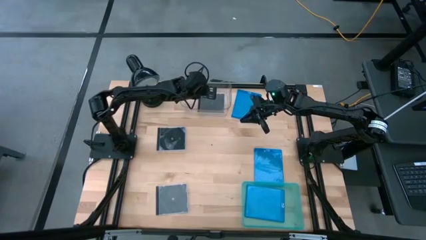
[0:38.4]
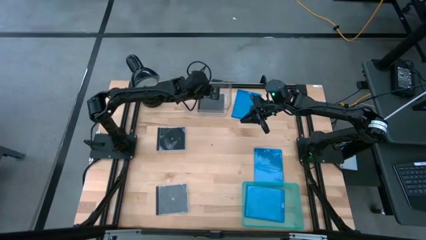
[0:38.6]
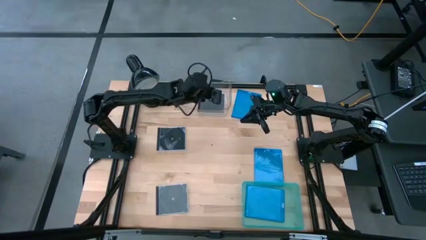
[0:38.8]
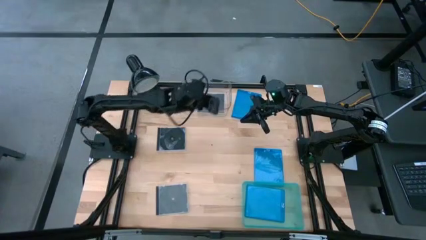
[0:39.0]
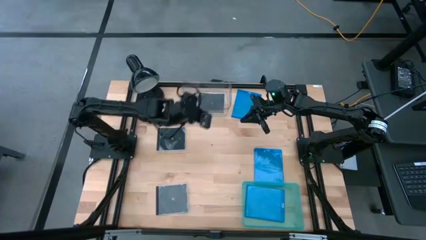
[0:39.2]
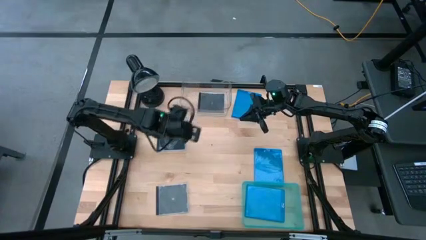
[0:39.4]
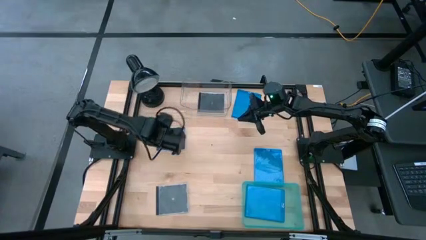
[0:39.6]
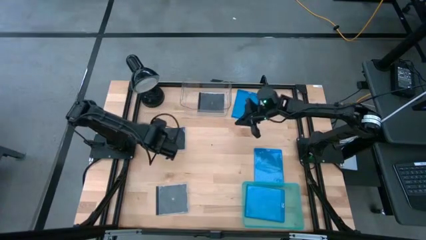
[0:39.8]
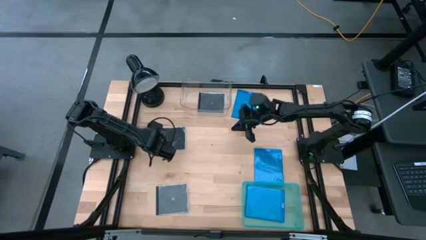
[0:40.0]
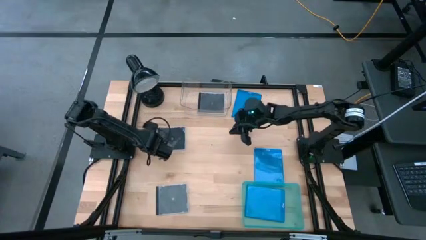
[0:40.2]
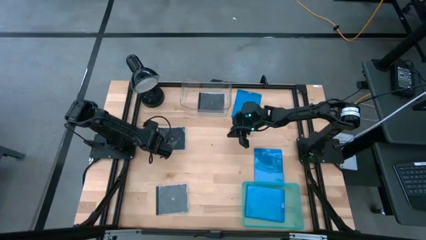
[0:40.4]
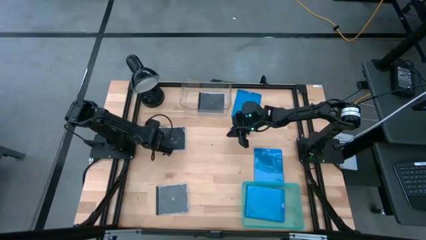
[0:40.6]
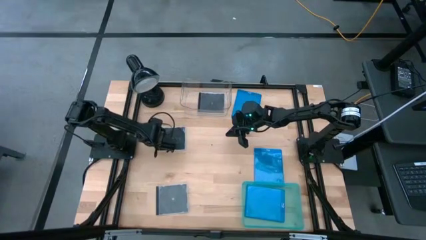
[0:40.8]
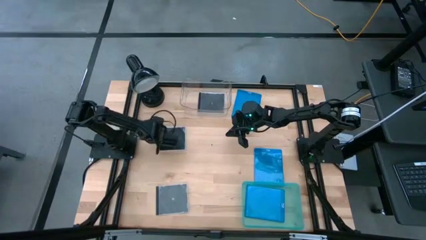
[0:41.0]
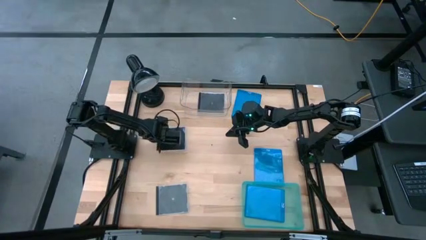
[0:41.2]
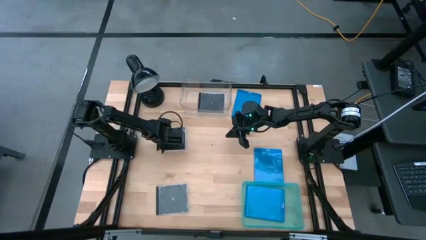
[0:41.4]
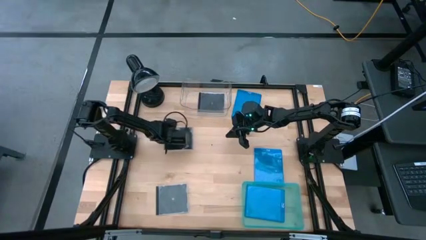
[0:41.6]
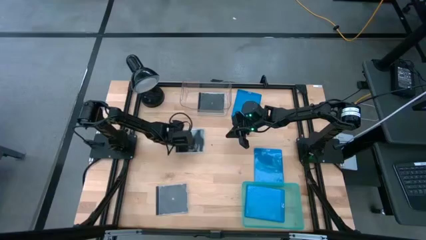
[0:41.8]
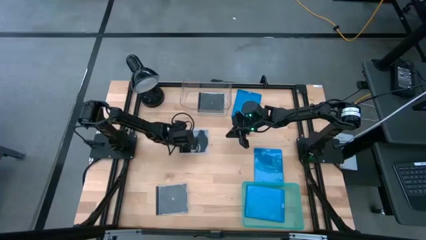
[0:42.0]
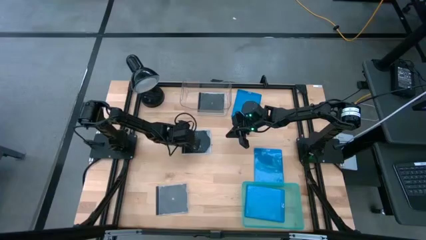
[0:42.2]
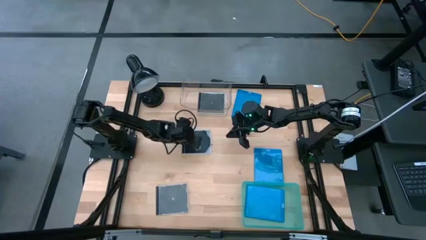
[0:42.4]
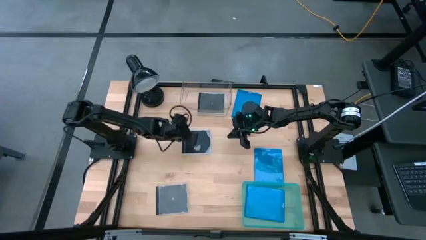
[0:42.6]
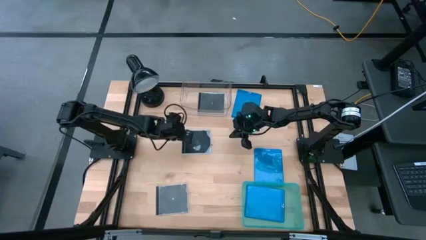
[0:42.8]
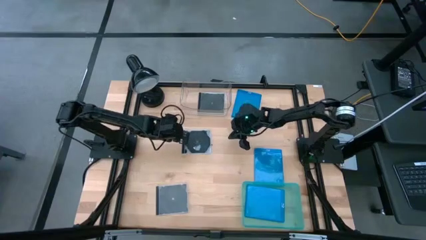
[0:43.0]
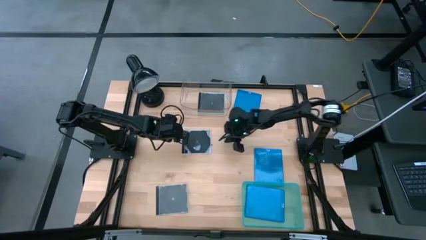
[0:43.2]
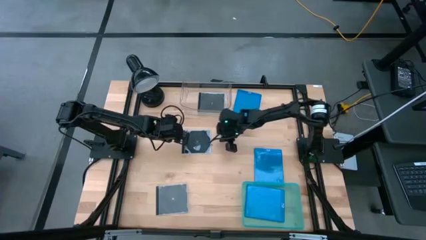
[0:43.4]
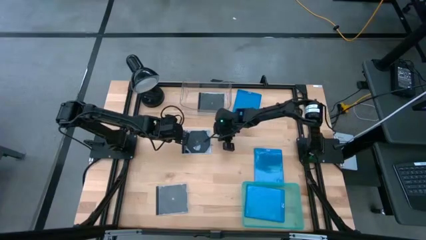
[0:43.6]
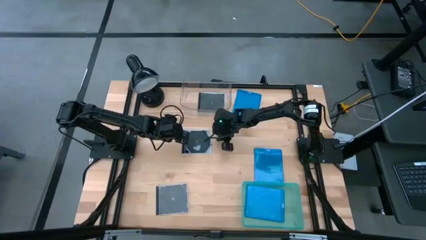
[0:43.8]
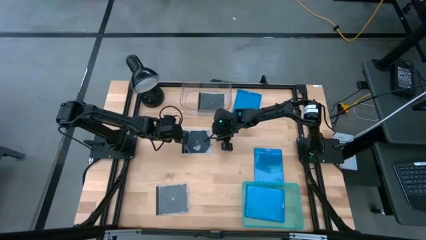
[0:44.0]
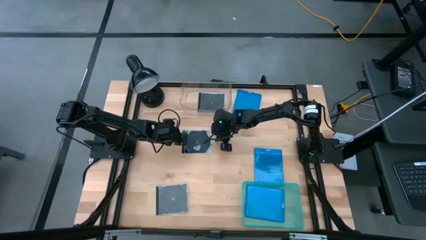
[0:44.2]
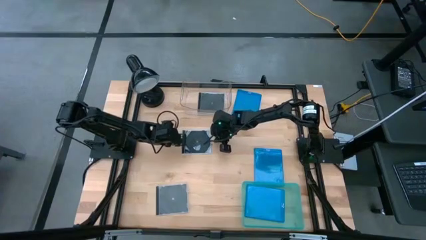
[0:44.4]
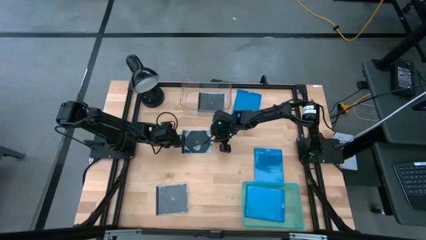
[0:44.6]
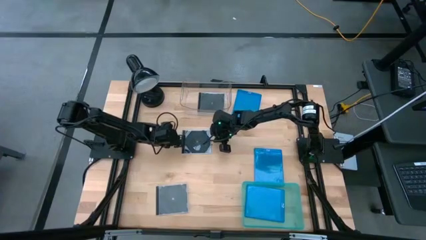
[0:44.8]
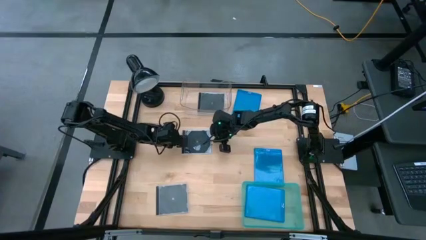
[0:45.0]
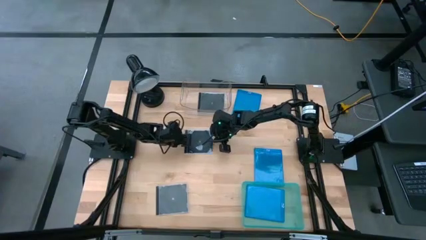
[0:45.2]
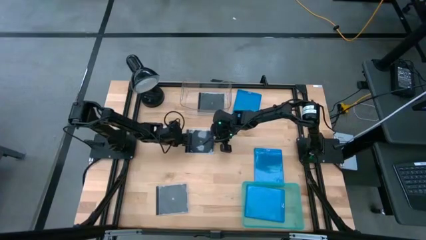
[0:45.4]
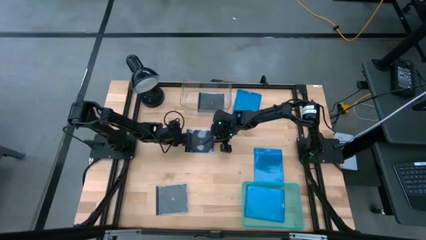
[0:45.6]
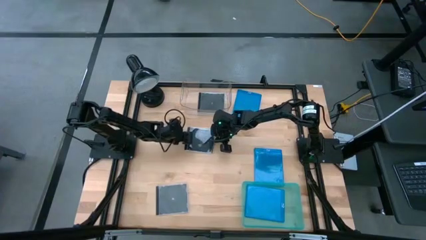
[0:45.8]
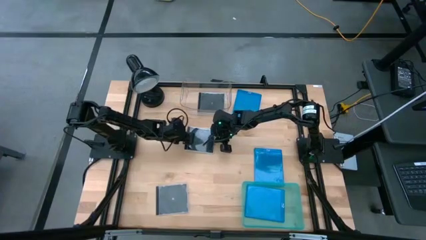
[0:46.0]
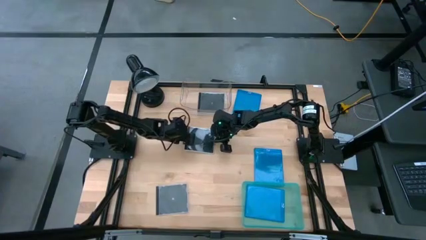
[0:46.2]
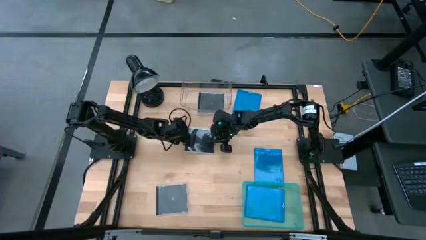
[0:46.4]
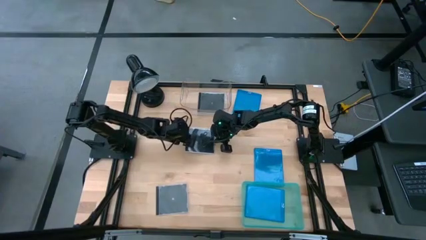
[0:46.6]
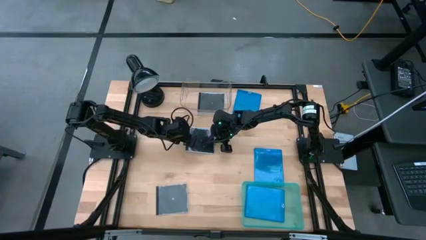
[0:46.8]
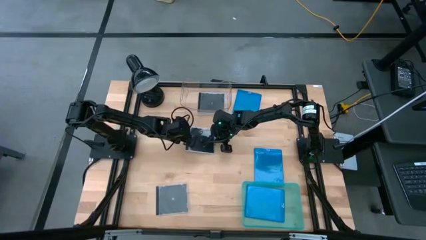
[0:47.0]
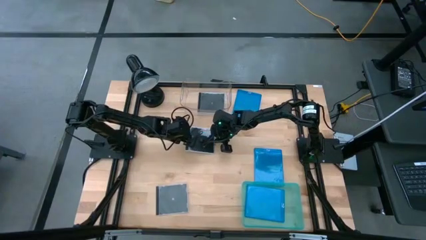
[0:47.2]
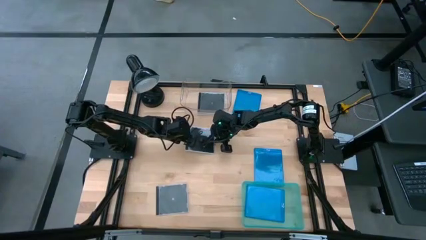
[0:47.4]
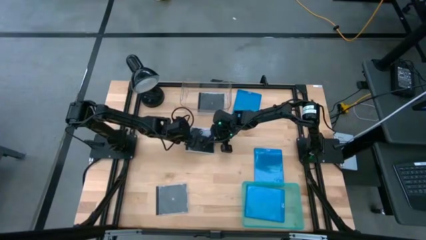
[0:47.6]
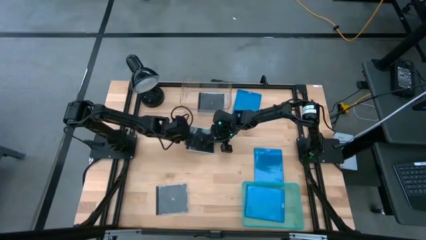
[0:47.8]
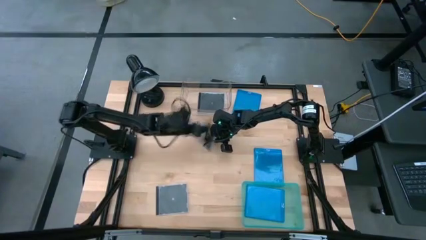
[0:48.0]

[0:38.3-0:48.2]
Task: Pick & place jewel cases by type
Put the top black cd case into the transparent bin

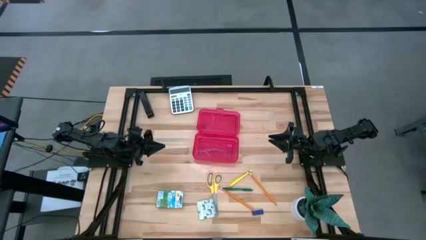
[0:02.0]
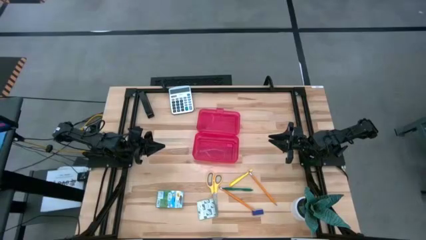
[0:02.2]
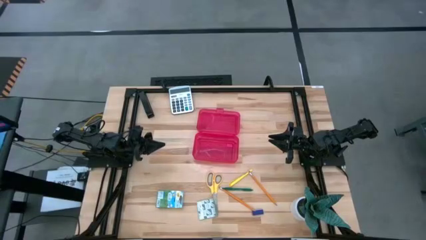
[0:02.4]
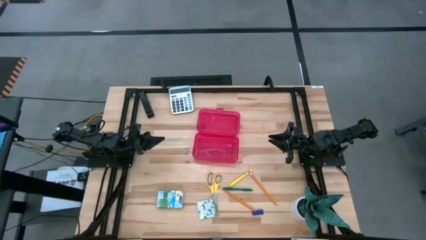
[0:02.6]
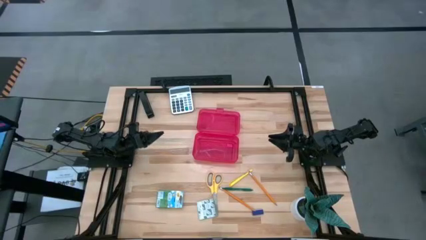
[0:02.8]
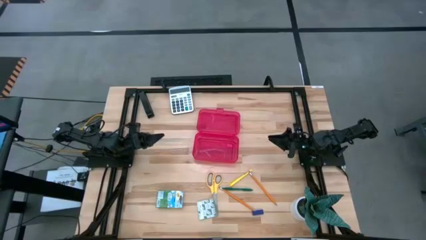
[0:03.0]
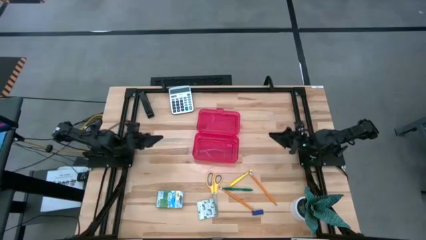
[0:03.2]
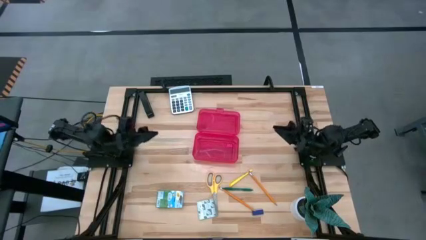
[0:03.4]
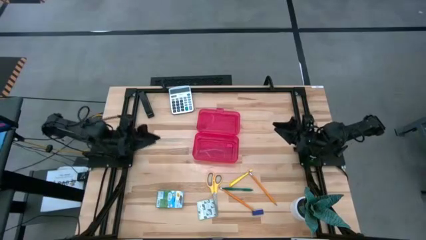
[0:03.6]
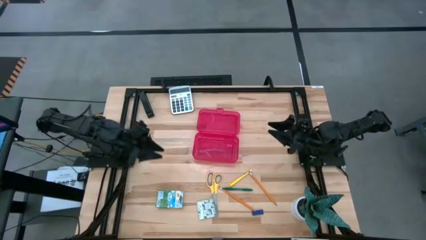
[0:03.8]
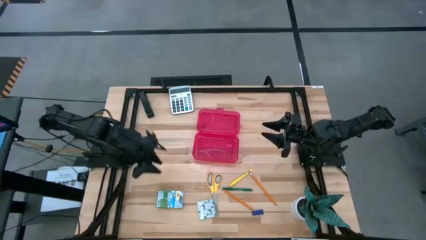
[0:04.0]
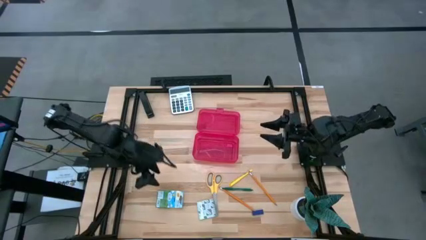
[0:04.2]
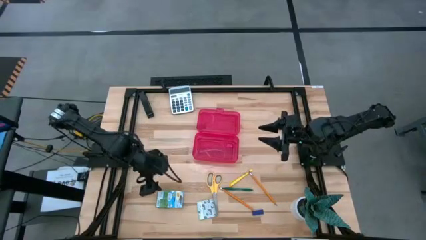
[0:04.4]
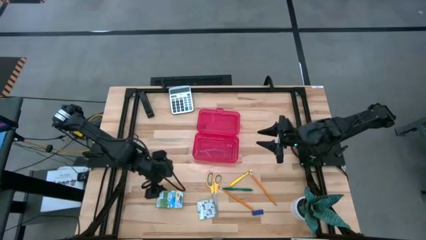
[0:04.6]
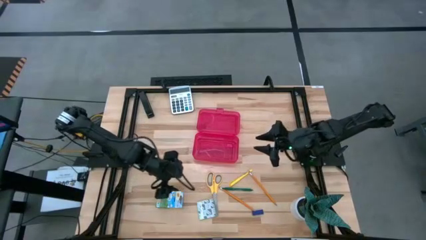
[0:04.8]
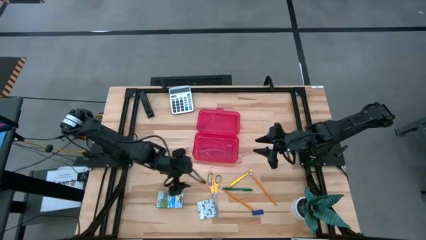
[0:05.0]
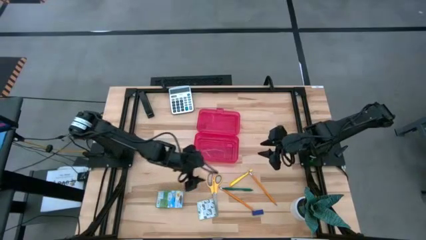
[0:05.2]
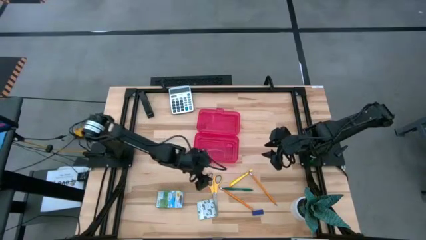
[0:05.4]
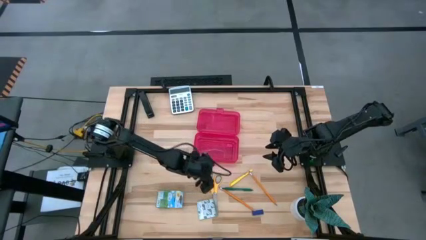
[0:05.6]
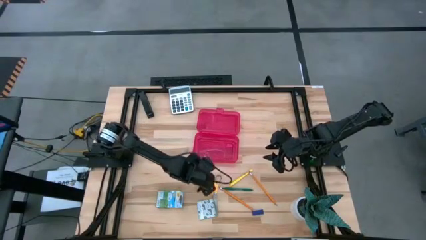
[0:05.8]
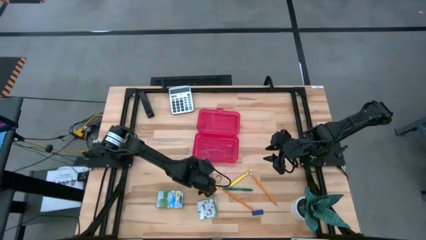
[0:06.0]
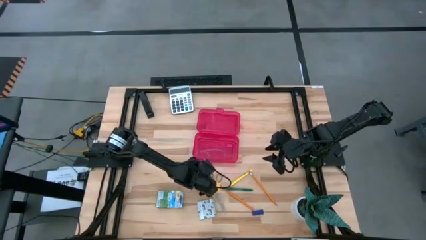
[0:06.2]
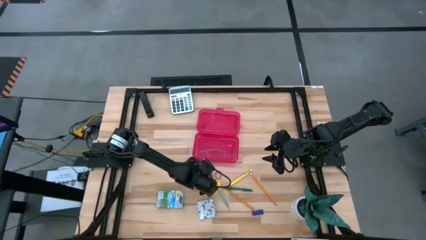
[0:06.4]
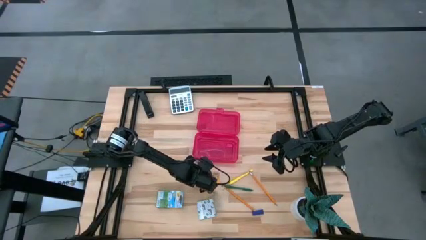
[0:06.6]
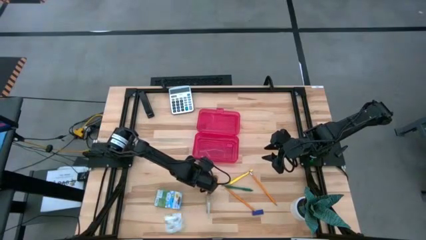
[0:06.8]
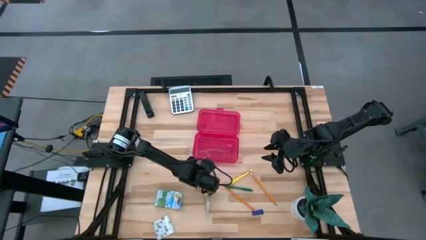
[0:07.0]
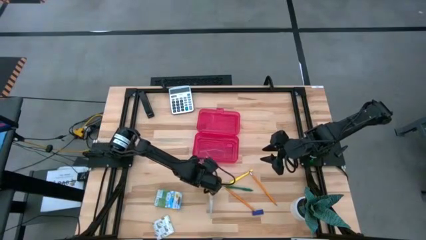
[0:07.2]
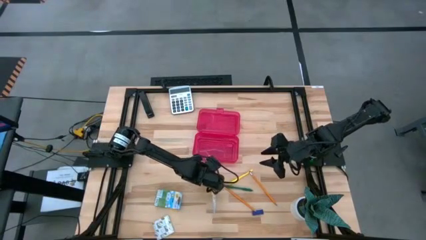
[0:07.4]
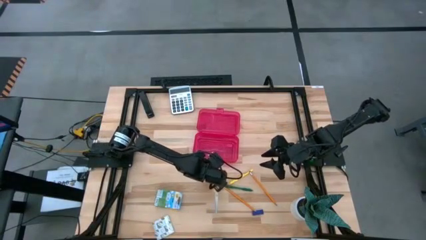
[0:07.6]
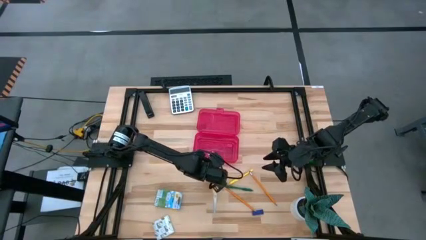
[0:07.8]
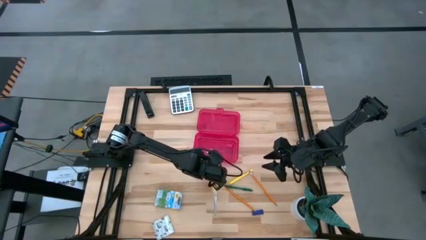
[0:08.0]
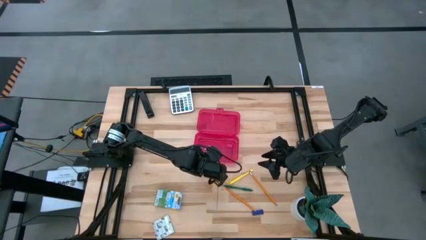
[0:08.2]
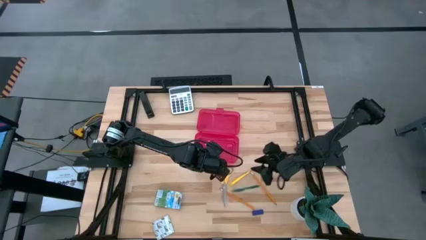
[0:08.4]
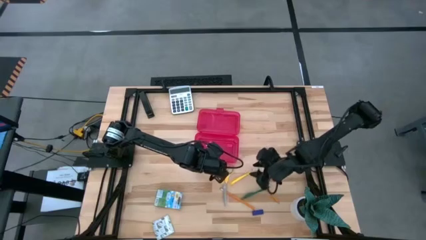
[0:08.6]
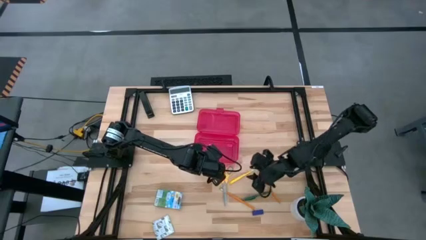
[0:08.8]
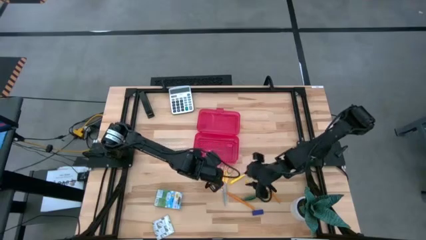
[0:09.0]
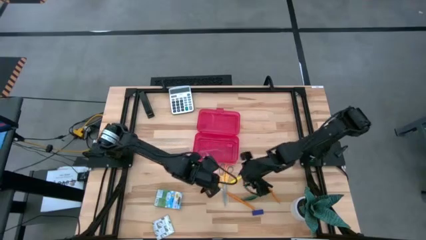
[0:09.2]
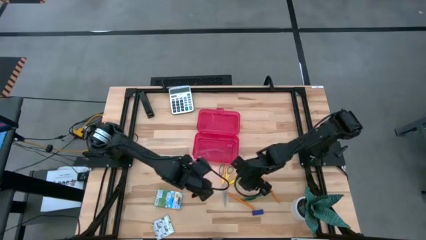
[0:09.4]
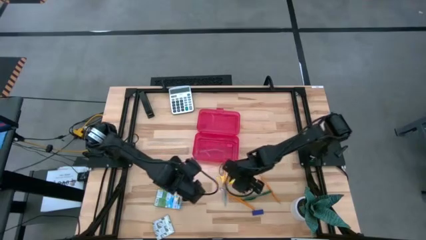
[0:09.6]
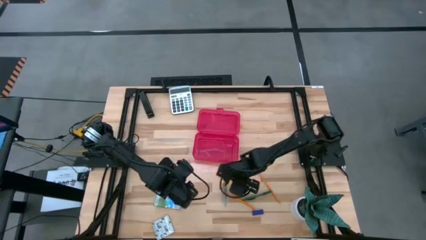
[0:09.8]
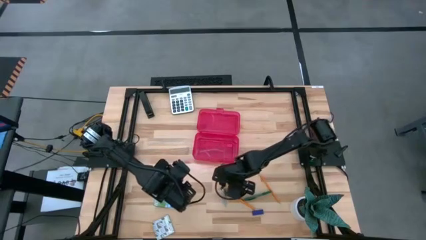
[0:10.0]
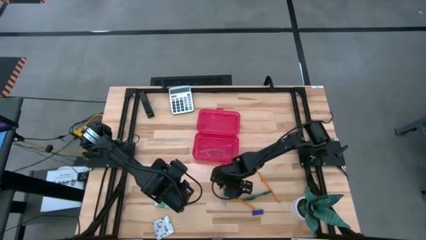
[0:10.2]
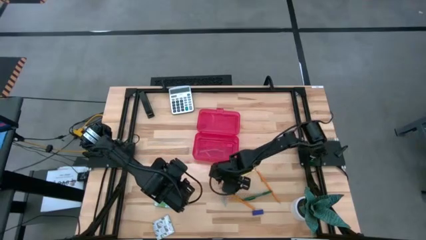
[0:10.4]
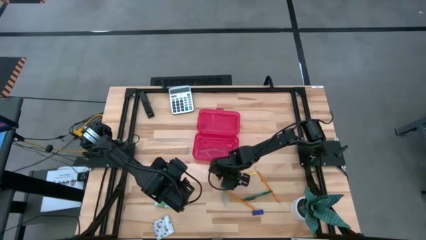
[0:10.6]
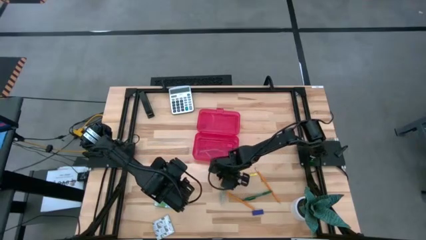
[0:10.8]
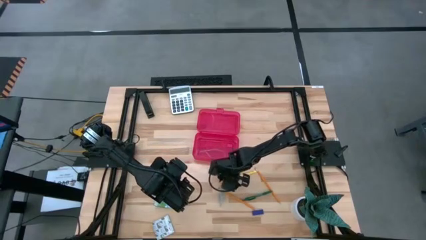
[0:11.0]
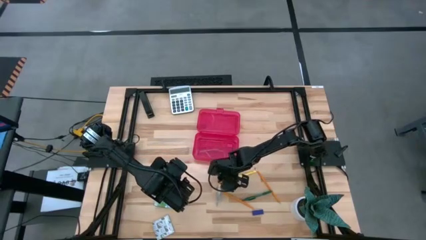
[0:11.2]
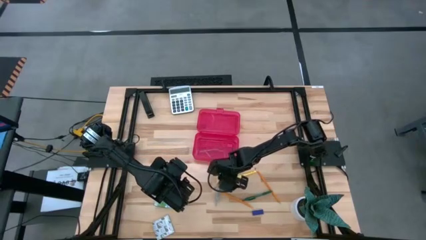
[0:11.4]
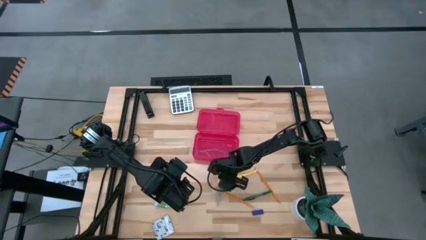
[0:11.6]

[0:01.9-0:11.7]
Task: Pack school essentials
Put the yellow scissors into the red supply box
